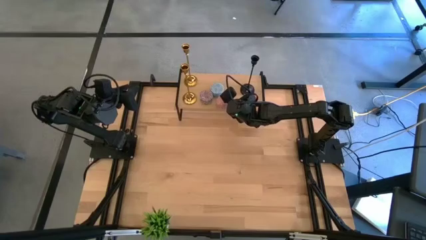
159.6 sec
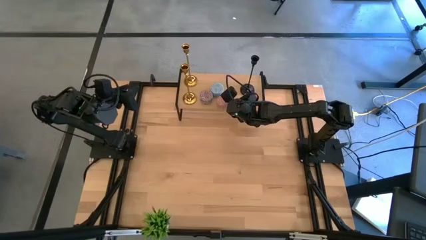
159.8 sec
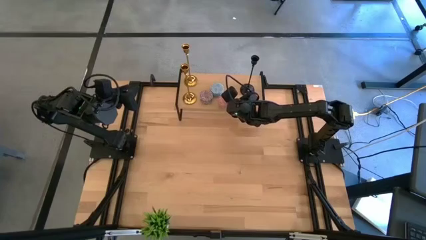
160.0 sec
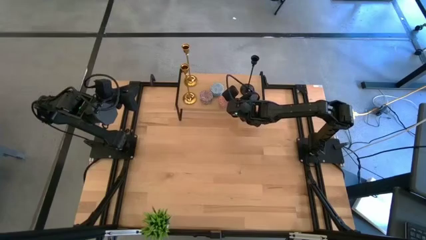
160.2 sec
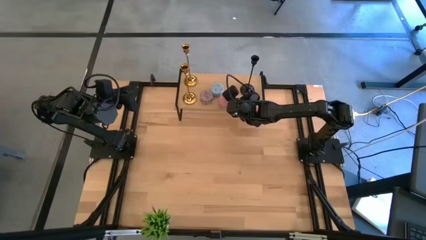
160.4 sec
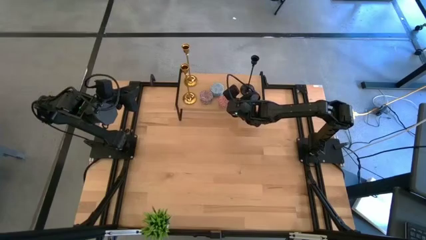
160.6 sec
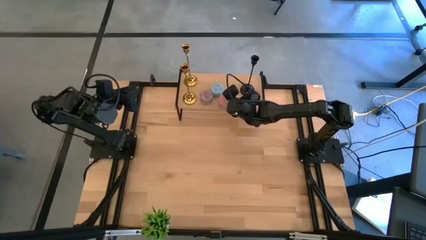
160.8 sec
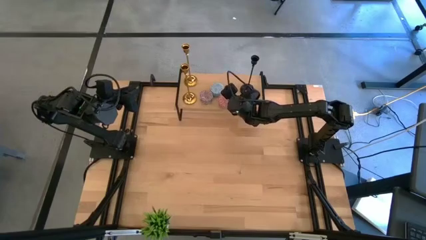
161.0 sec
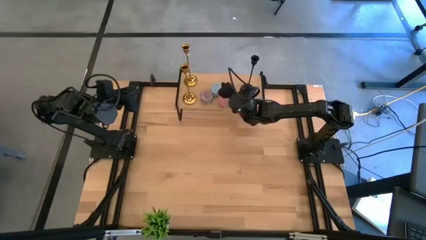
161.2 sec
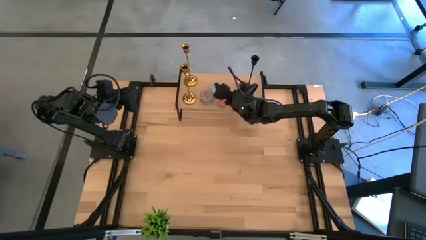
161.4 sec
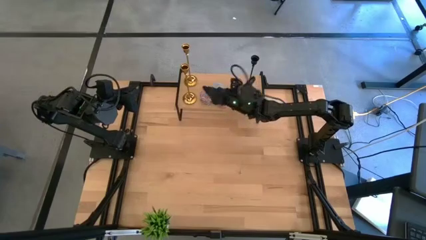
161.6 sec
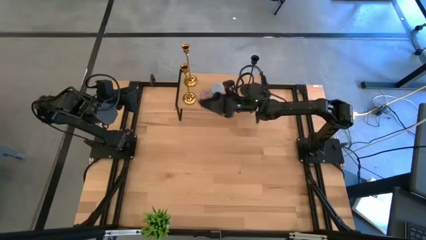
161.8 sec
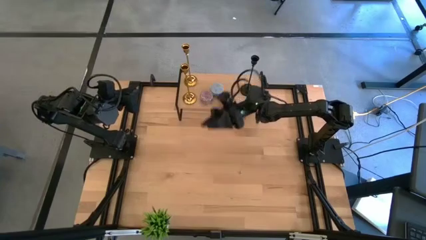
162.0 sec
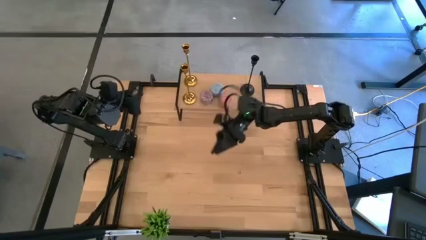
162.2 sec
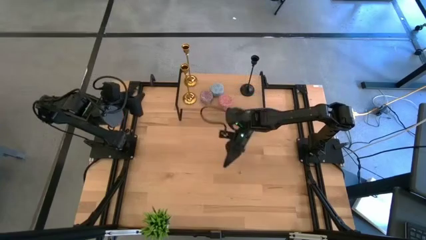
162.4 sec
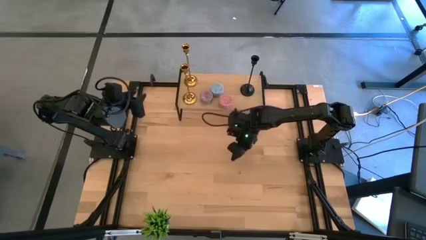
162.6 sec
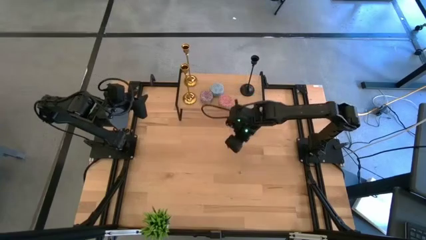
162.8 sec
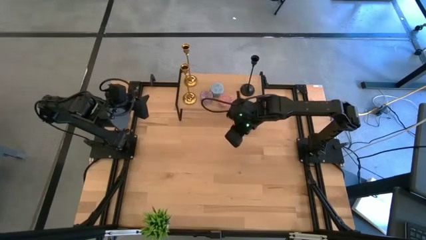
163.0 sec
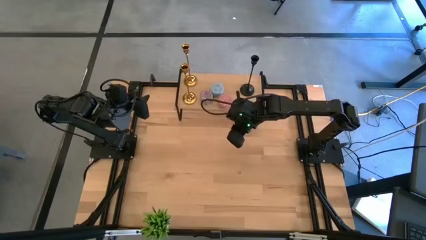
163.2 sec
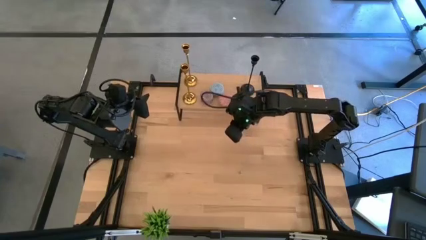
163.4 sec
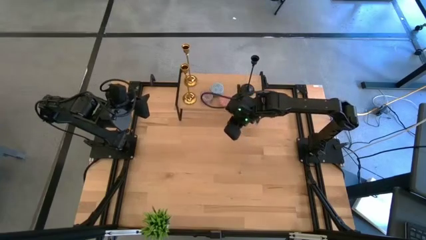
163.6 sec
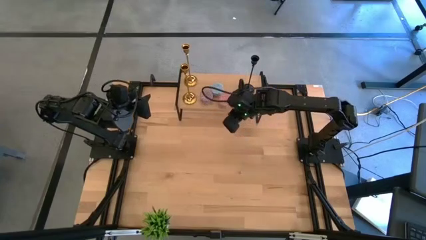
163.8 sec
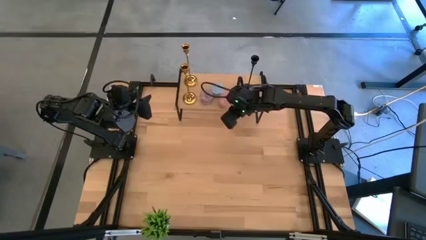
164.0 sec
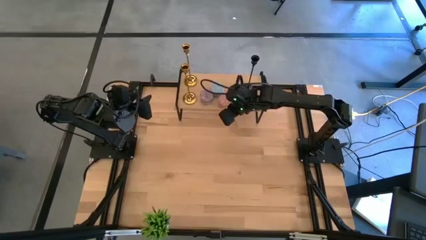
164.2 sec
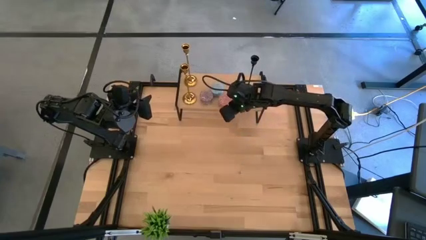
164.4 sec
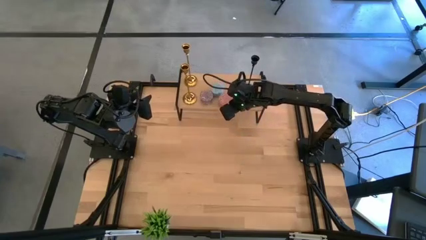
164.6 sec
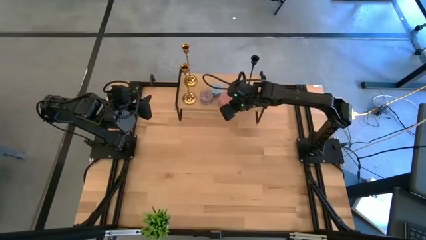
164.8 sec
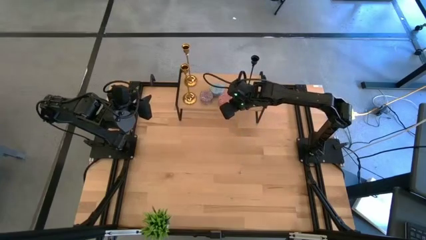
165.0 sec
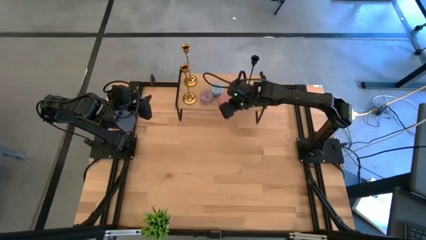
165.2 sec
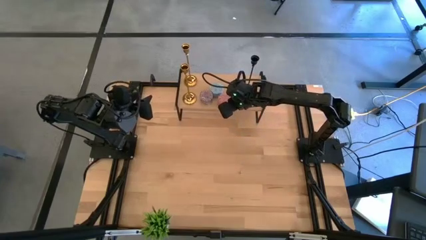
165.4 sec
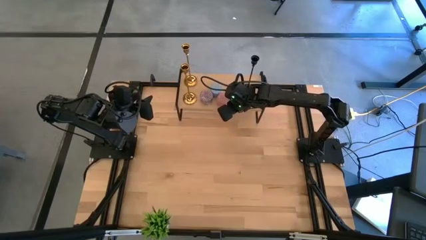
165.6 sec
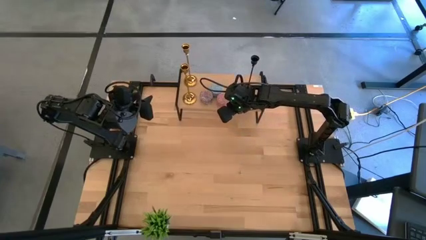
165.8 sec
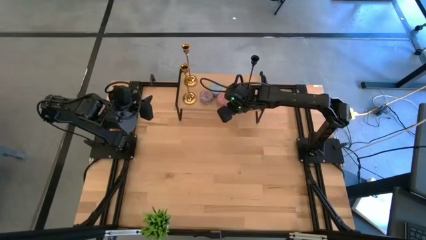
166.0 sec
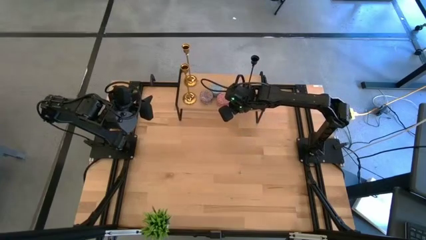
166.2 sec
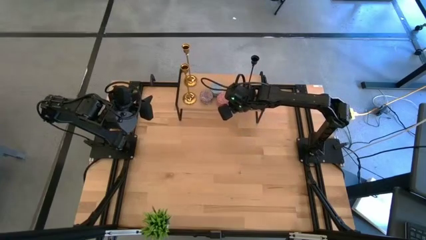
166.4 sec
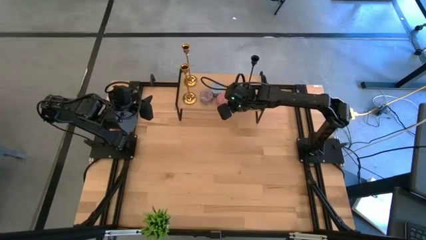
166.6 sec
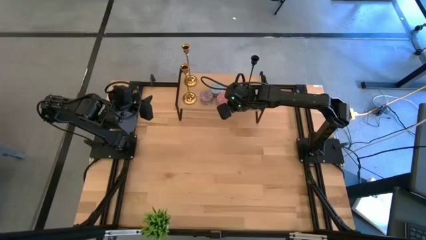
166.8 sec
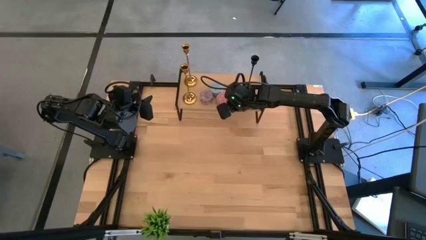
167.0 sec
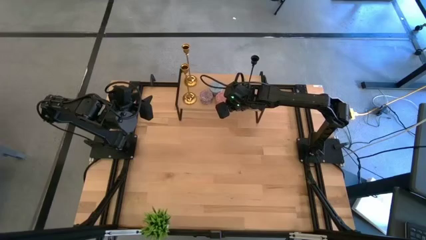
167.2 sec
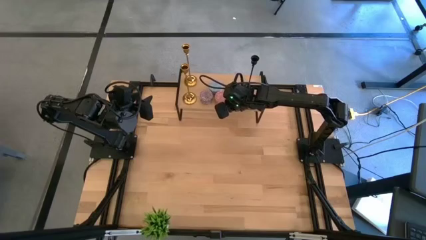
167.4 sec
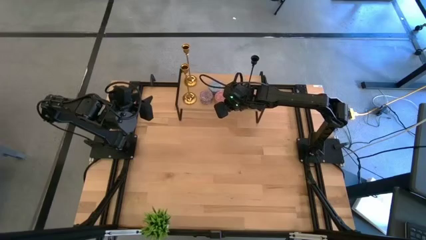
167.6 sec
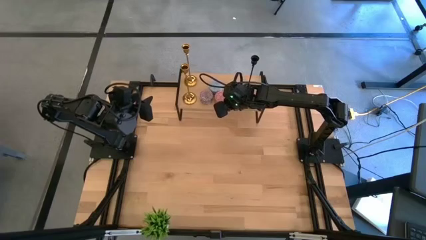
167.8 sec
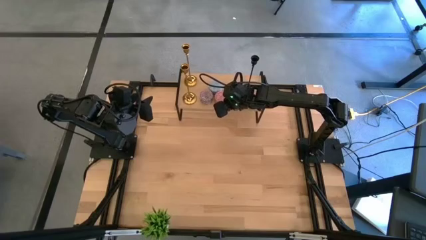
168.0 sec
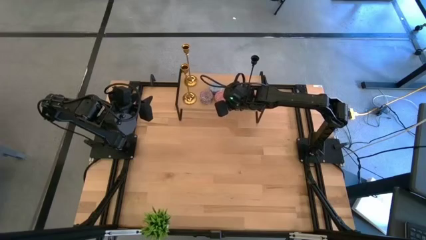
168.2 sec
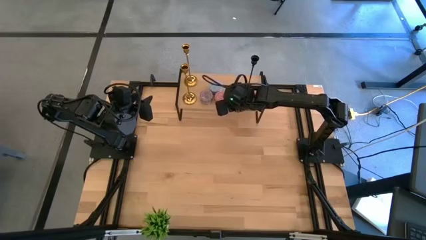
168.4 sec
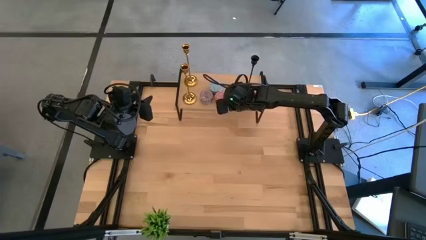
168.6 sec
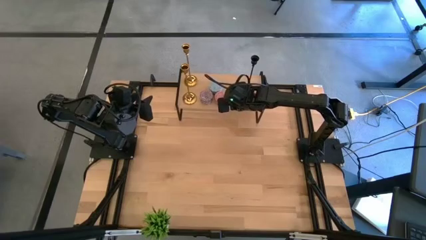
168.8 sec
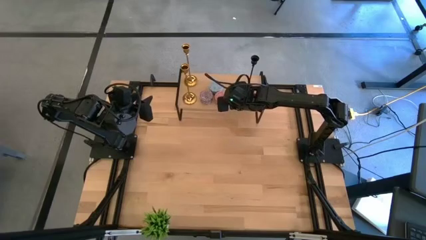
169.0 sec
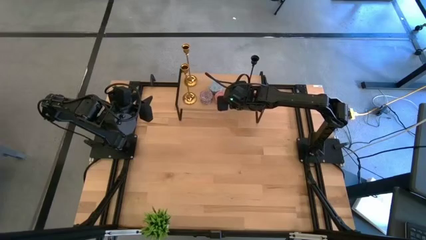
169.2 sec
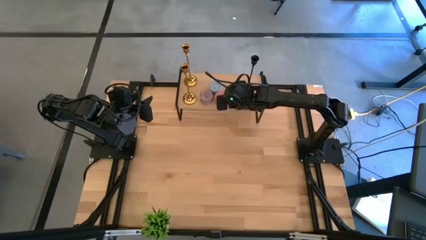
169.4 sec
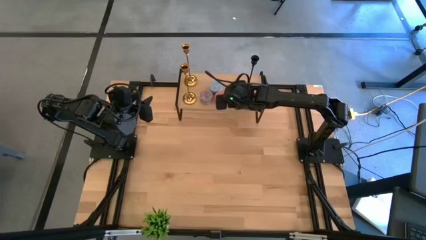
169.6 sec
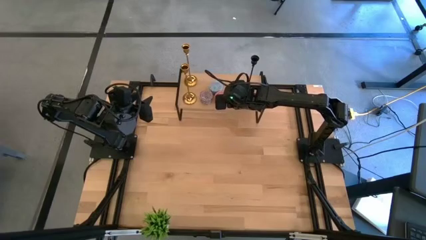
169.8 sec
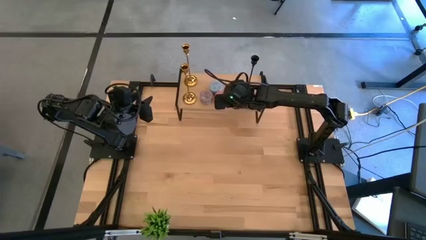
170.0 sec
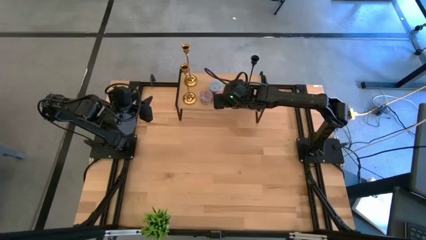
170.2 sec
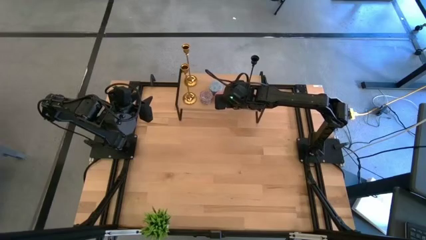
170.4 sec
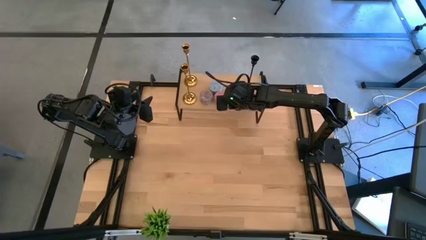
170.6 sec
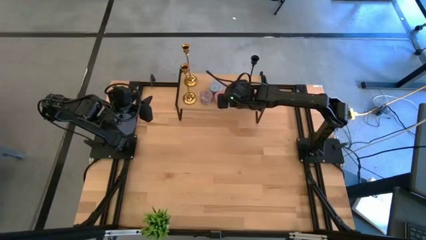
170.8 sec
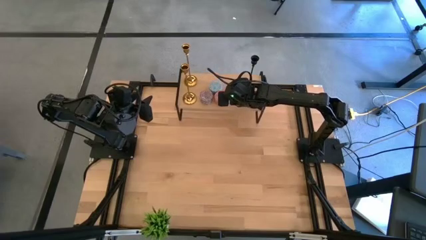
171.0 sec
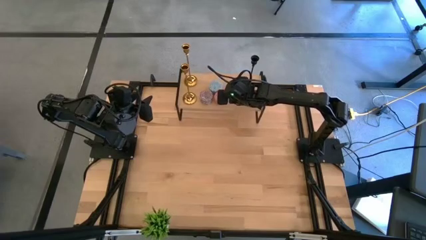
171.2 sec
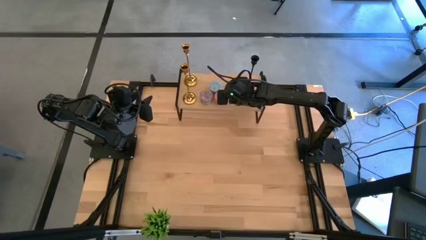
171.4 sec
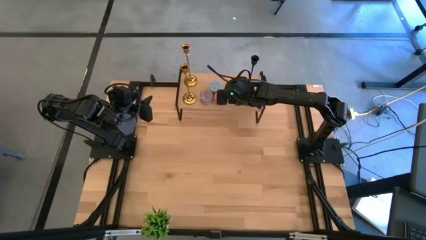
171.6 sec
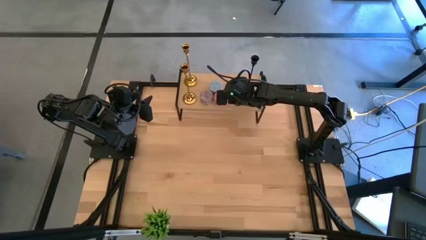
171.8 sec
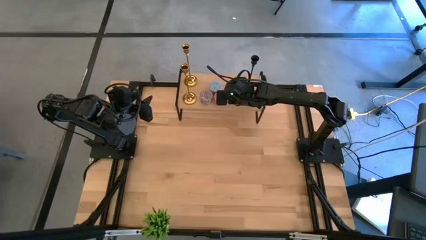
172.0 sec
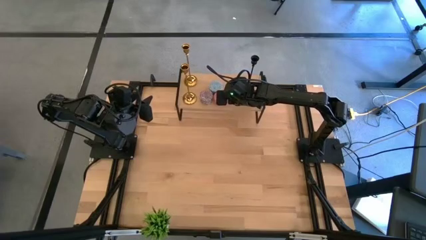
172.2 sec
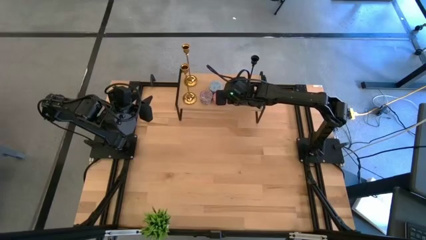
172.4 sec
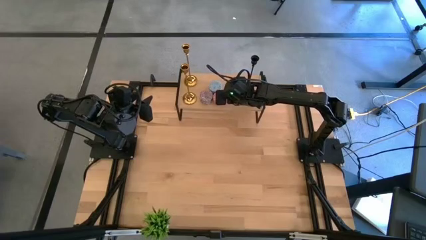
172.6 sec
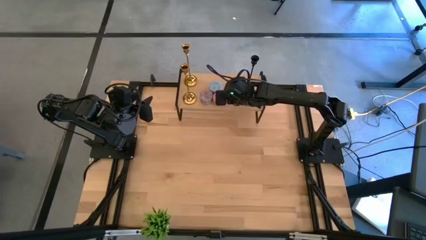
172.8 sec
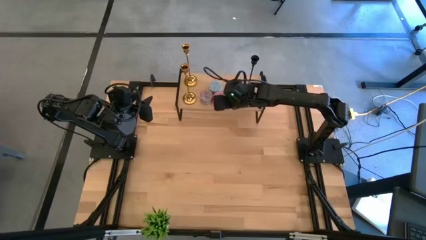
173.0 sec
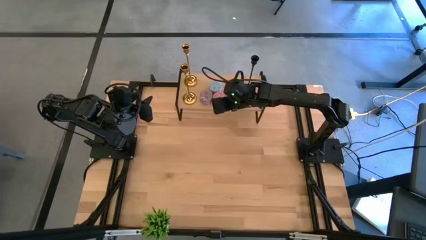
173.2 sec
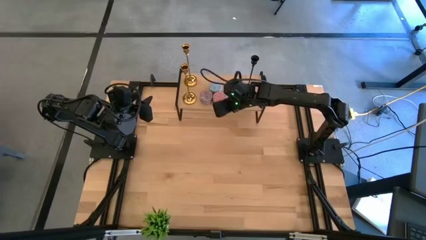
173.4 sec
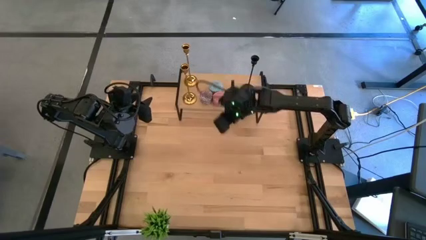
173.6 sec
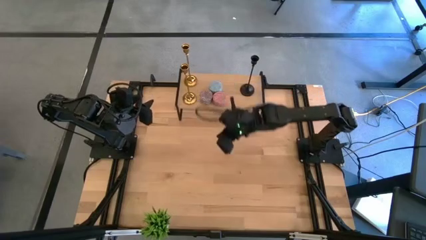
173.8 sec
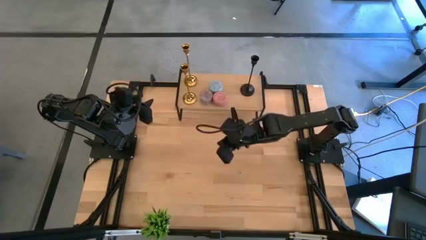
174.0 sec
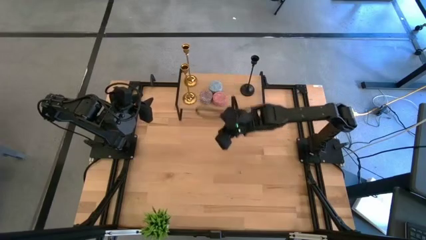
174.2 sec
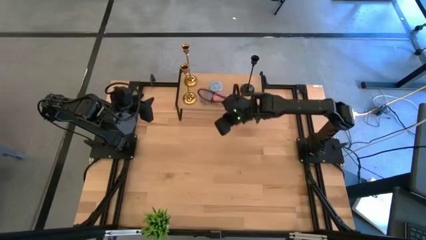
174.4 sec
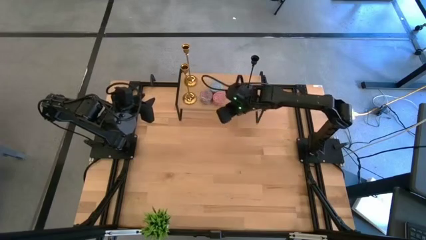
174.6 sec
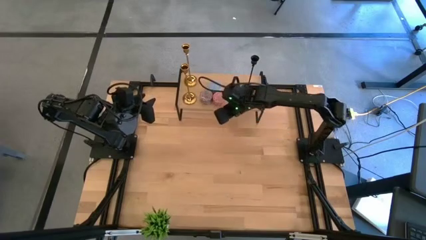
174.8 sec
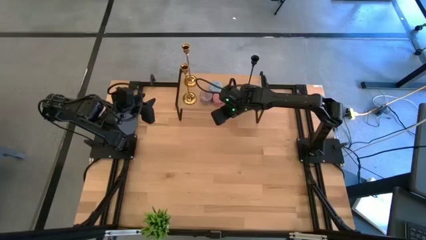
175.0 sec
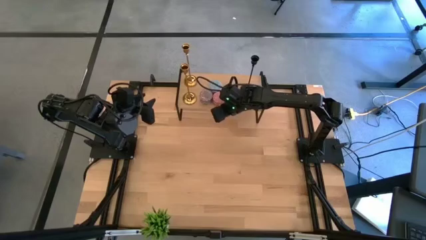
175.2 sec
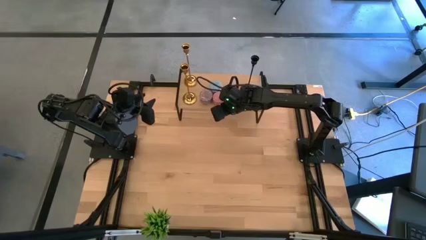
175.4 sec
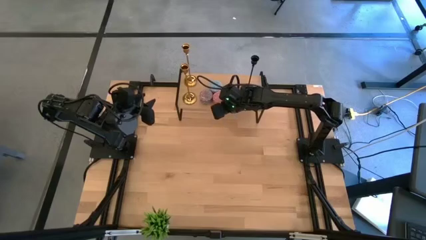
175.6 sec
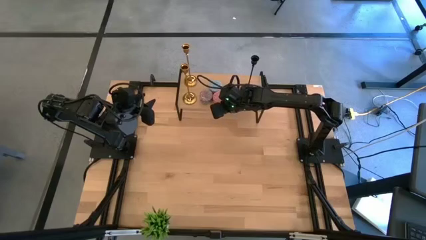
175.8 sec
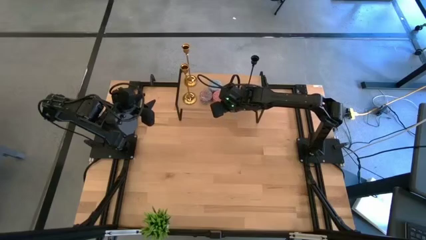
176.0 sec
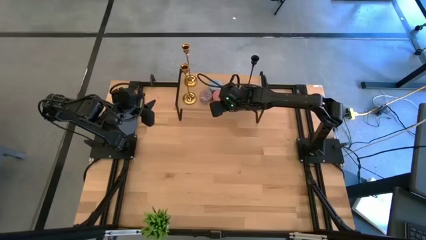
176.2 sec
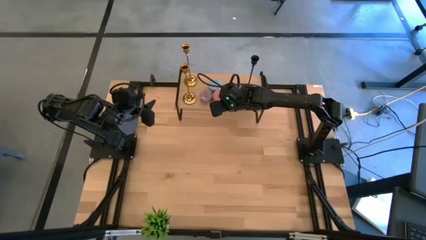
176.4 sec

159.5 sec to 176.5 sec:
Task: Pick & Place candle stick holders
Put the pink scented candle on the shelf
